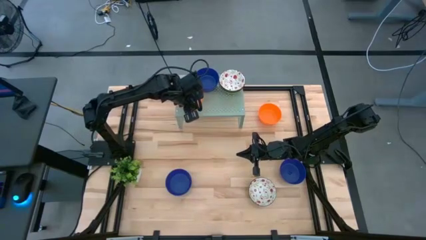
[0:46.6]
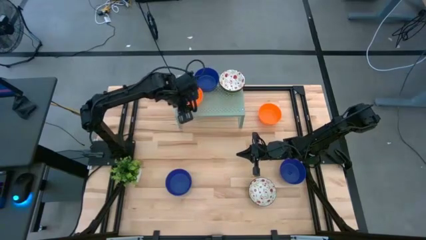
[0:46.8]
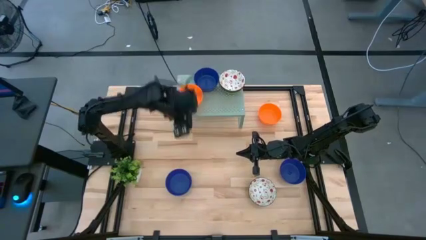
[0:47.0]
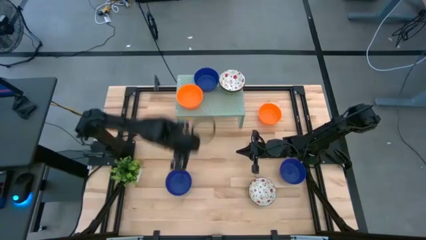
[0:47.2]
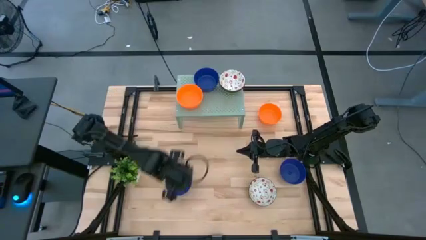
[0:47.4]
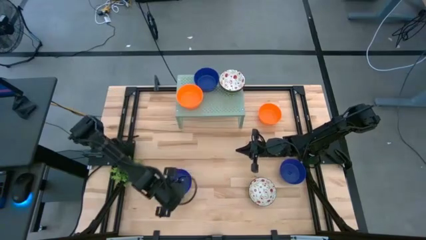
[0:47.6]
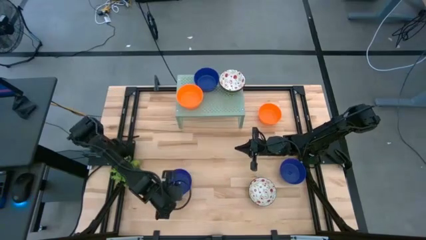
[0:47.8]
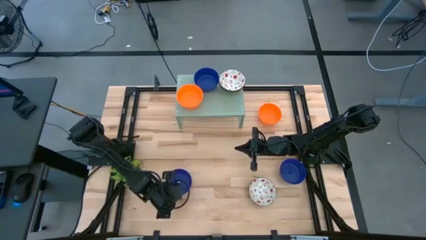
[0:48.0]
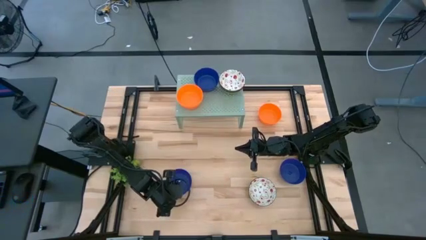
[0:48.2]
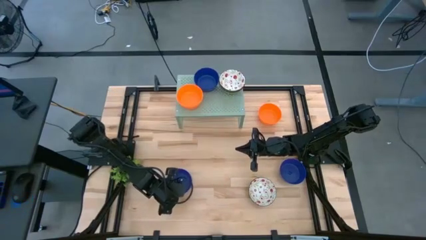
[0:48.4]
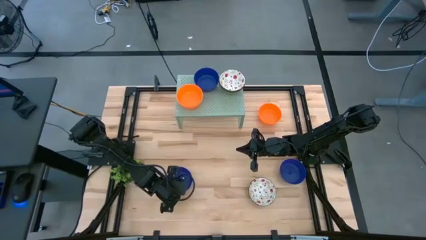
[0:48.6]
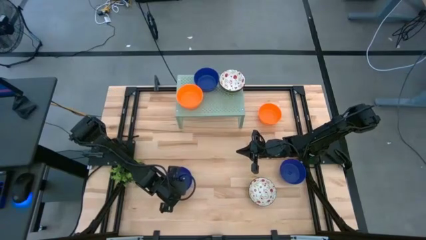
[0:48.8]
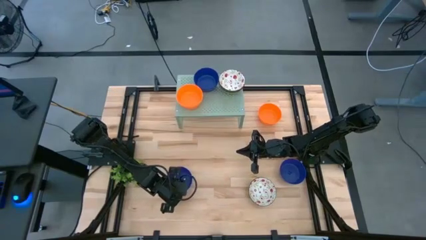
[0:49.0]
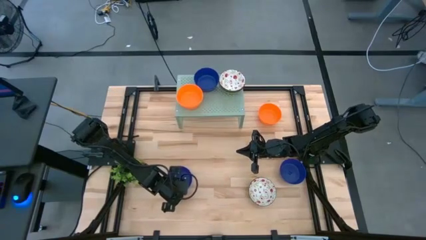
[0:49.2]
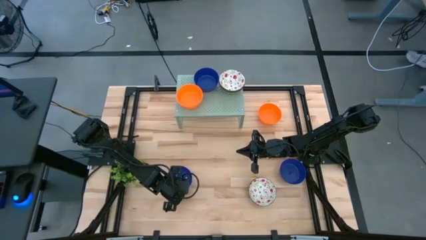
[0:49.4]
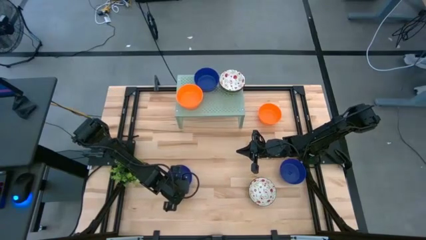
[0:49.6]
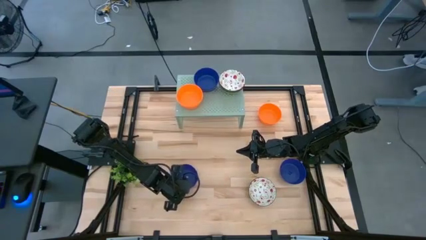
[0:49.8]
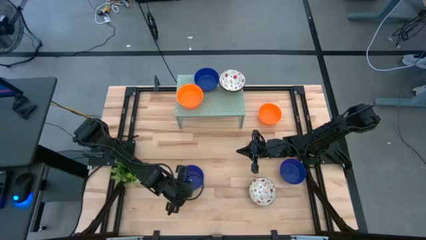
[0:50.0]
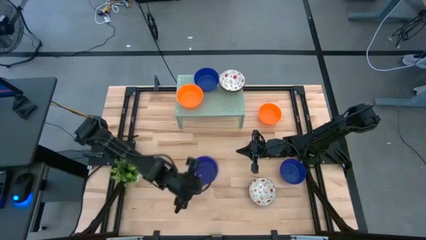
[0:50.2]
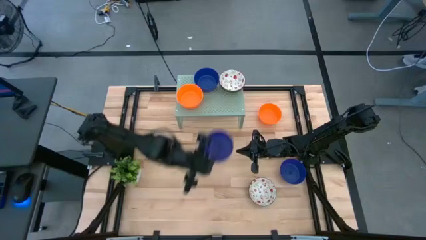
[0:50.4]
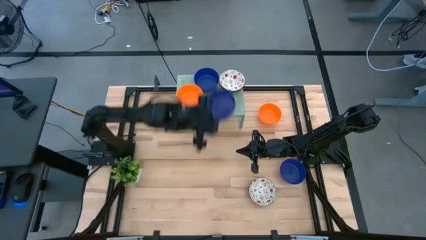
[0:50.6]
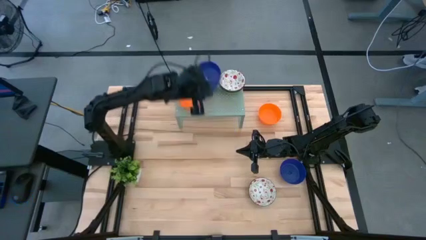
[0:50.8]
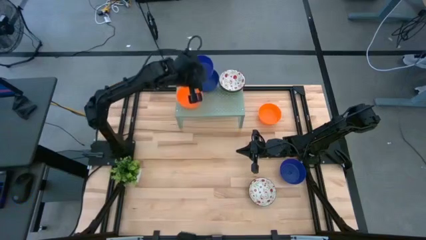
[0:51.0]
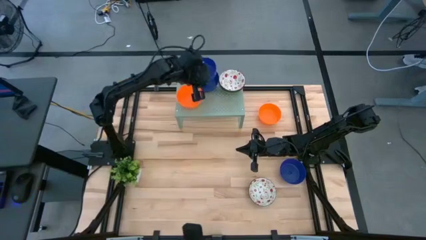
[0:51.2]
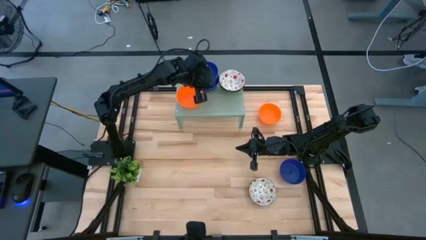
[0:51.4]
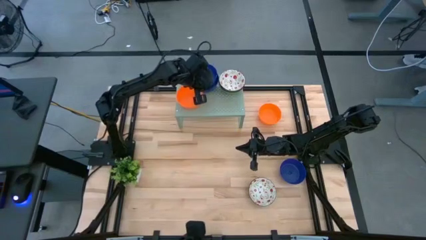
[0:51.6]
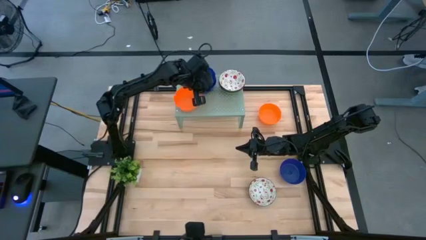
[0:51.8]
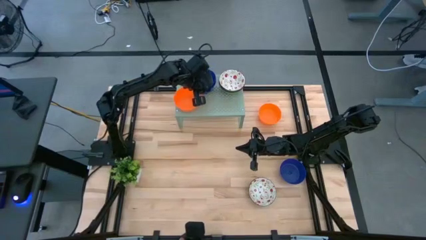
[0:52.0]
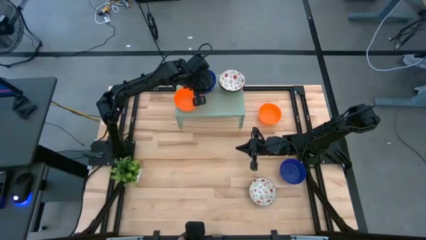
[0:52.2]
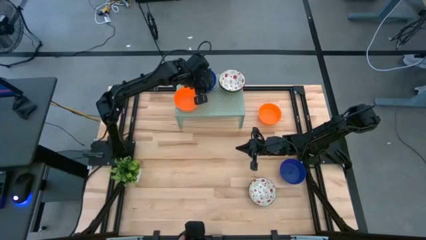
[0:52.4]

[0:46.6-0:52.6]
Task: Pick & Place Mini bowls
Stack the blue bowl on the blue bowls on the shelf

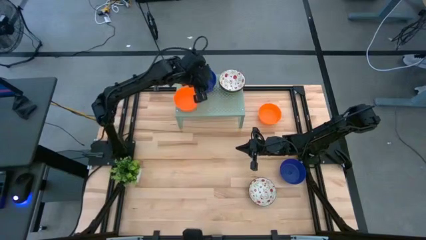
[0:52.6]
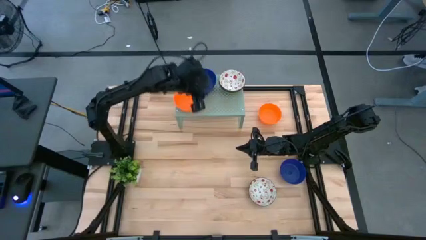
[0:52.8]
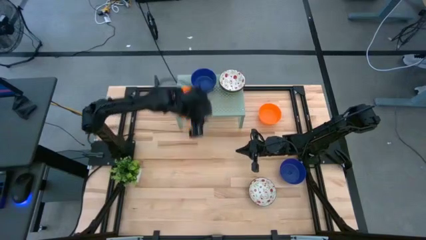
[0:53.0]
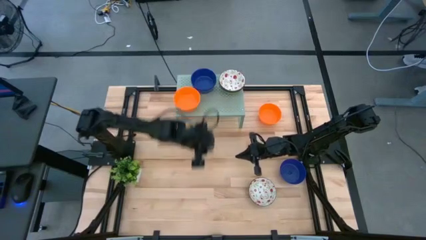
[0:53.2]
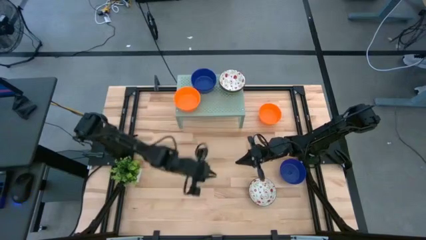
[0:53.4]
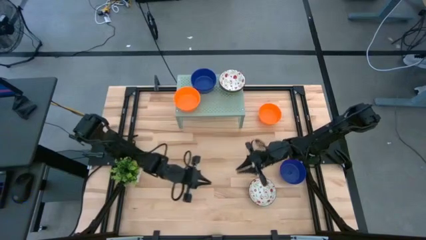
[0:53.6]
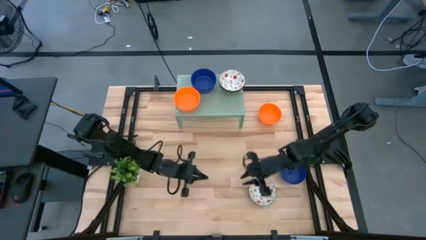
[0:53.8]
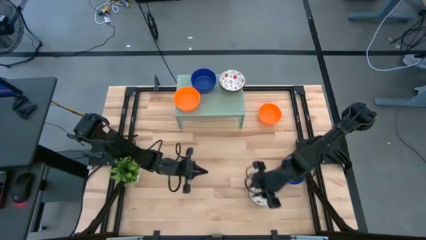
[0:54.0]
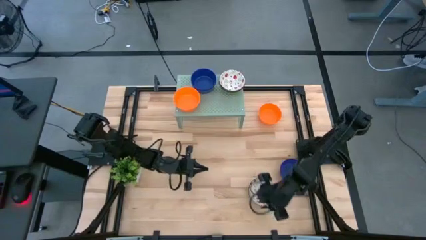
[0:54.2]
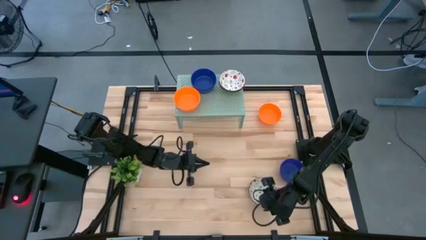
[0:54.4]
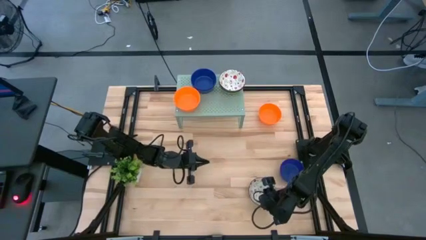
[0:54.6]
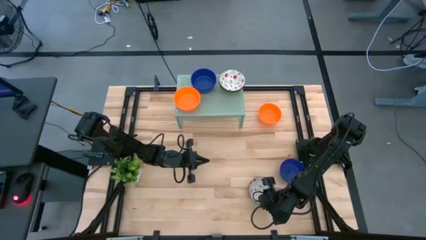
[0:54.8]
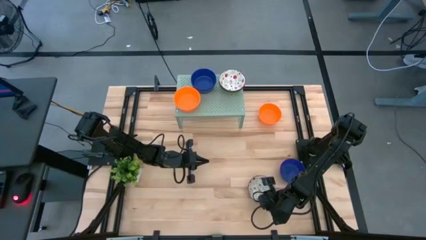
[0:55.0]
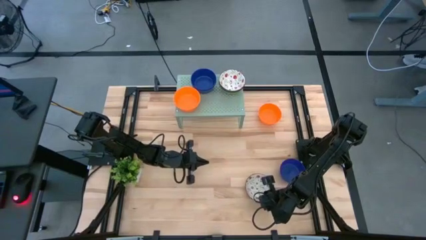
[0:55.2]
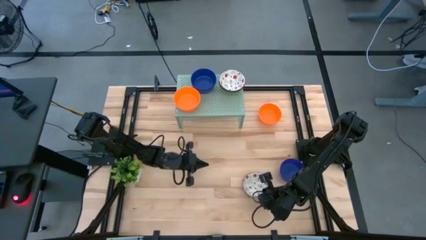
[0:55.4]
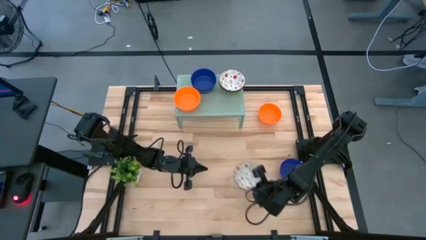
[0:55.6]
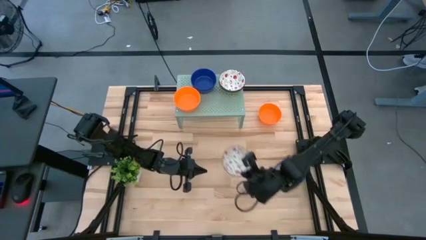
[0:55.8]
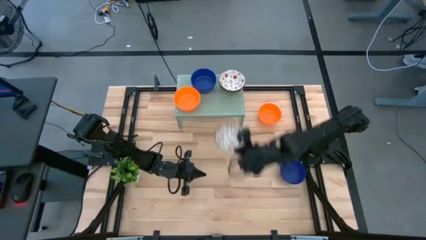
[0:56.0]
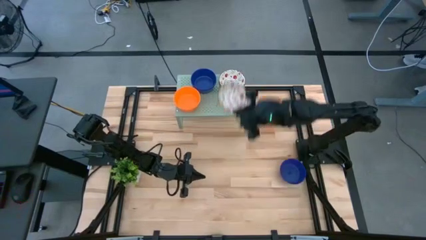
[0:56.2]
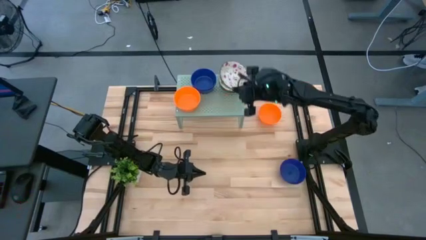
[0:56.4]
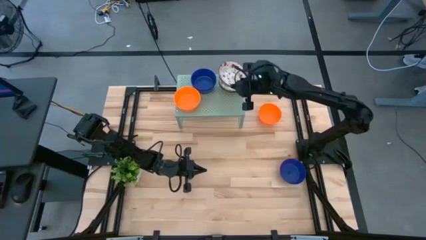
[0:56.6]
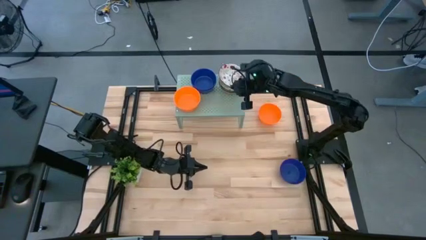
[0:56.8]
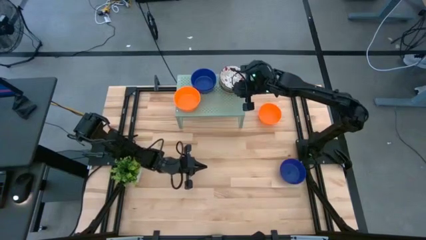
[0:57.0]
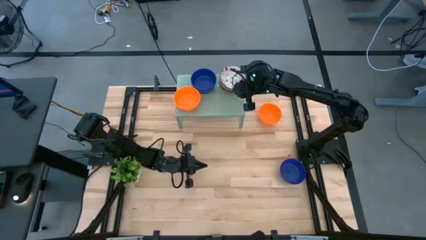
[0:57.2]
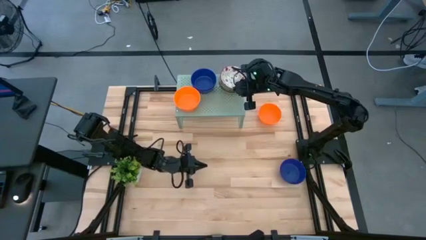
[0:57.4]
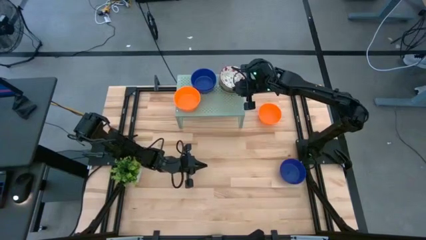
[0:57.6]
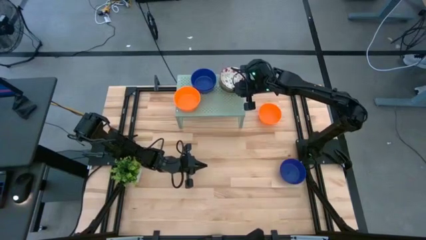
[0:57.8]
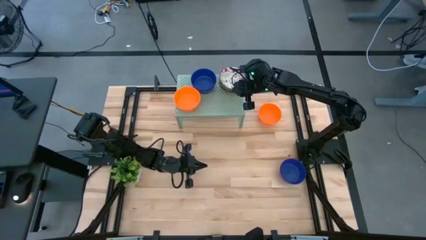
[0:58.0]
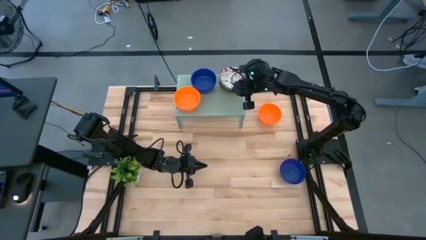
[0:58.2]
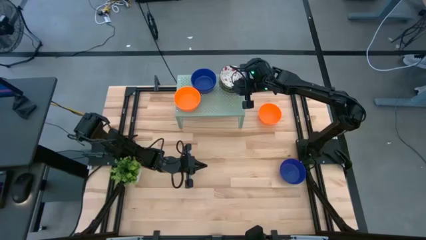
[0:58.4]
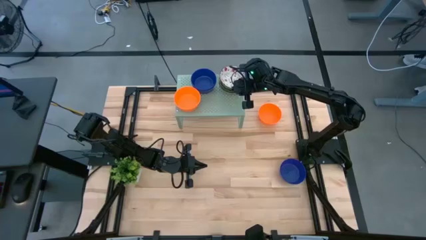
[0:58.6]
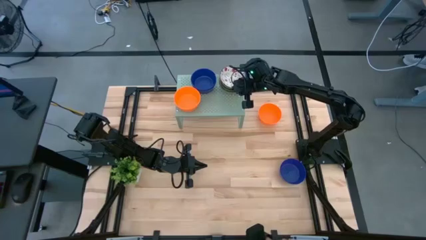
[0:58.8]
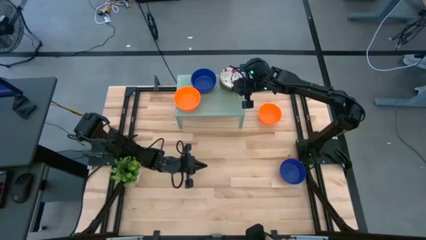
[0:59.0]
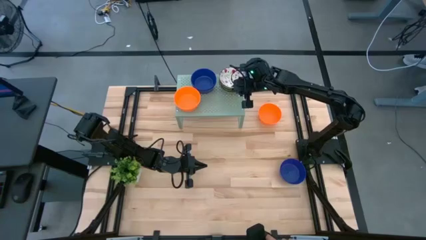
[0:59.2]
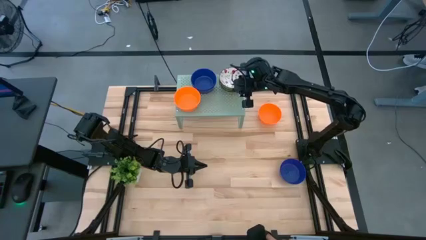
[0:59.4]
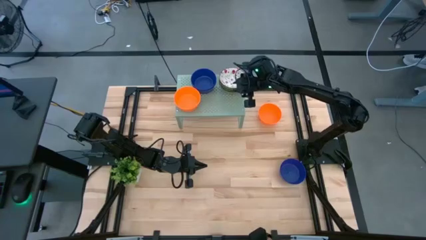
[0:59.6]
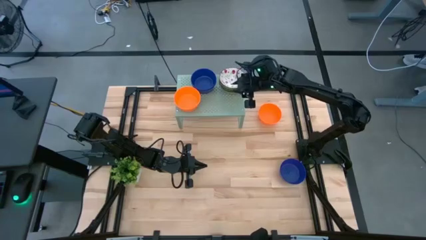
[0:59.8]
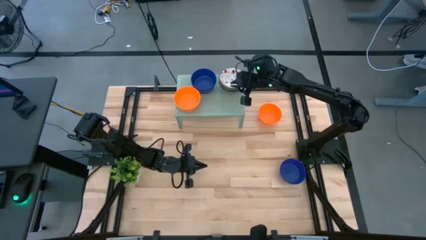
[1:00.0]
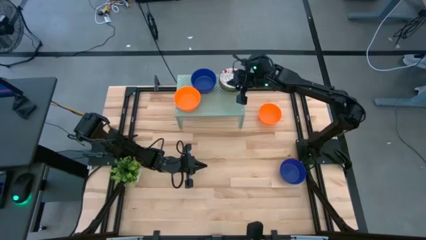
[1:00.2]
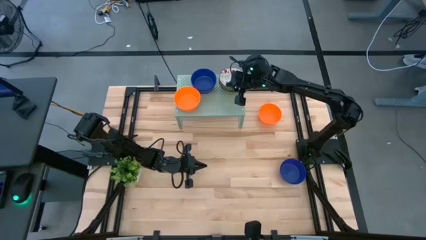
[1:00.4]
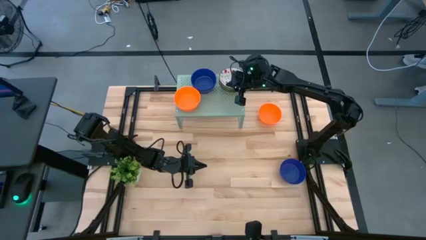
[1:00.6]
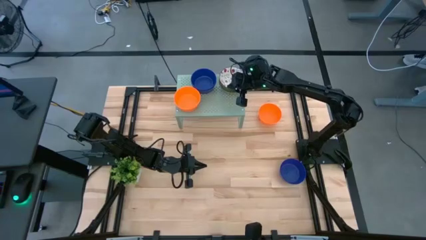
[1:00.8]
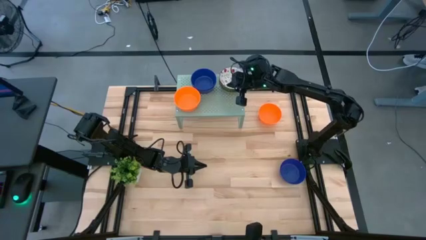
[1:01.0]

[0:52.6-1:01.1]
Stack the white bowl on the white bowls on the shelf

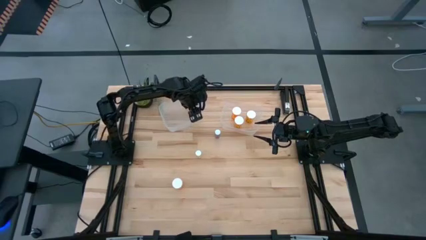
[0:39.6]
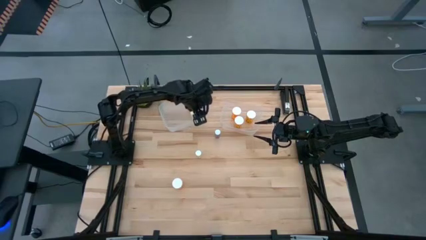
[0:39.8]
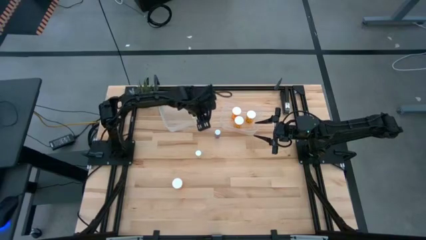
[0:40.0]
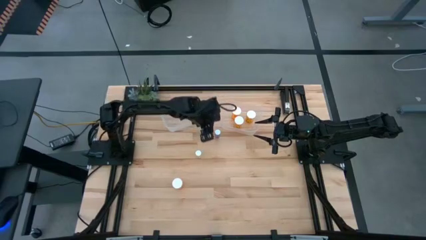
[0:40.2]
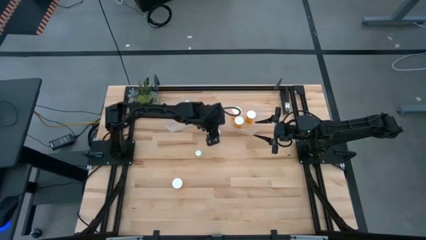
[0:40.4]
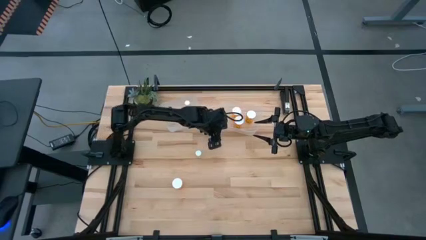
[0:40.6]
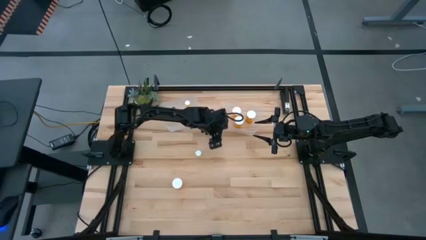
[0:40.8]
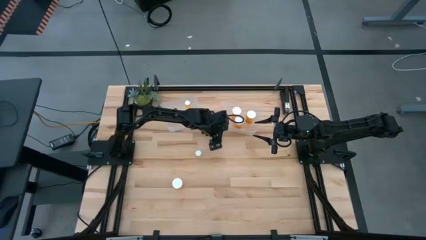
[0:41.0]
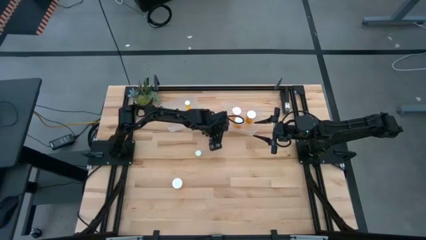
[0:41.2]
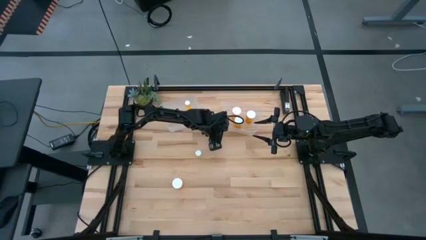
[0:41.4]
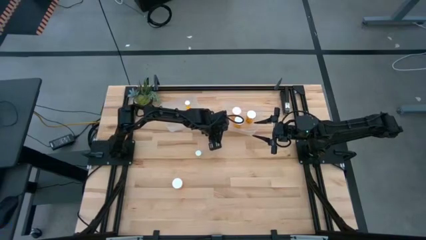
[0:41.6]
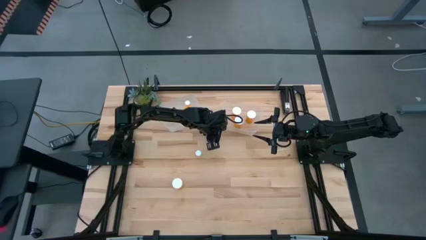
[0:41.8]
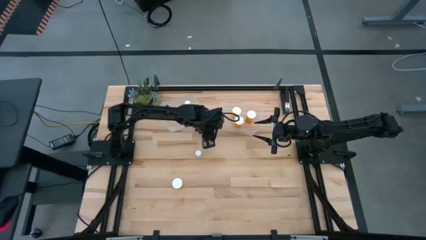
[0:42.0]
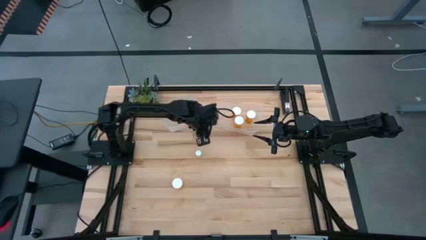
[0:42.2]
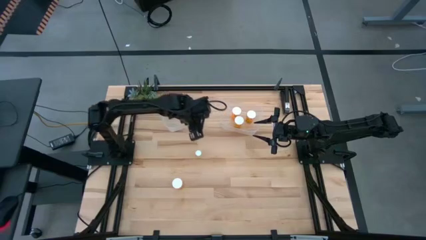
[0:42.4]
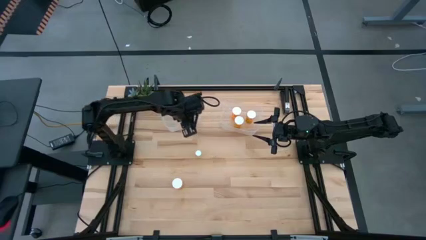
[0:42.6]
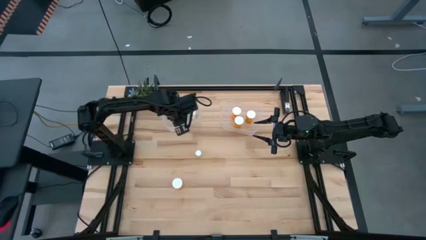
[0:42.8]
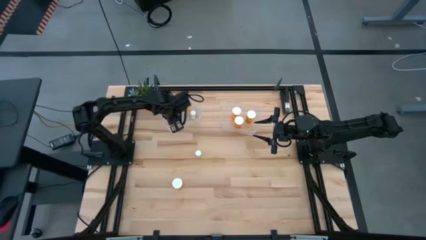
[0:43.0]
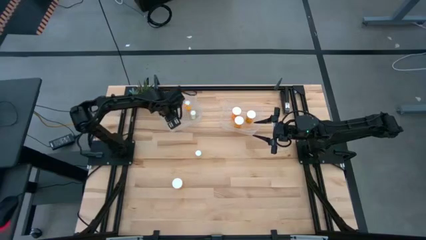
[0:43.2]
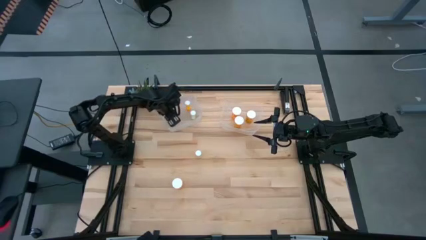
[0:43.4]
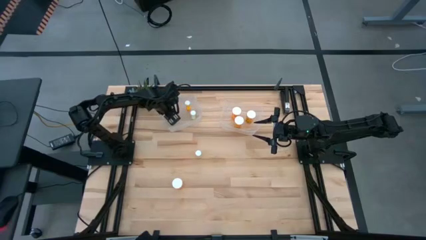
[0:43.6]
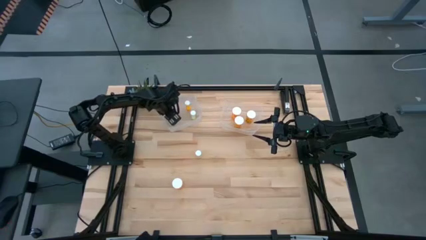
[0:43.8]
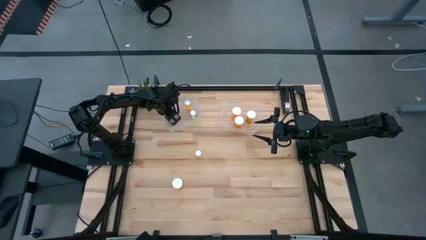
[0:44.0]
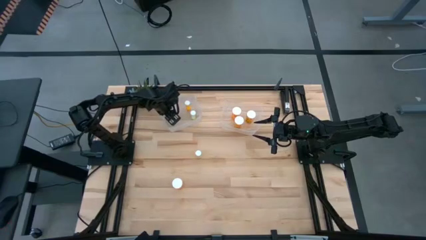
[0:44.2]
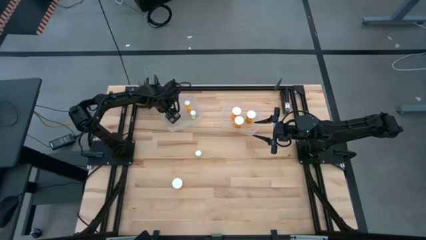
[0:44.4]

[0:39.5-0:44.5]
Task: Pick and place medicine bottles into bin by pill shape (circle, oval)
Put the blue pill bottle into the left transparent bin
